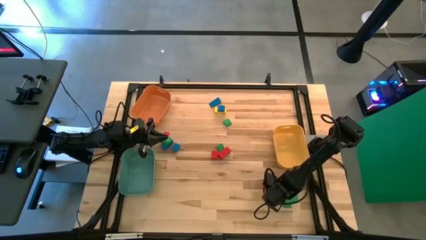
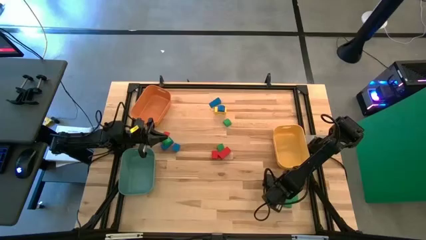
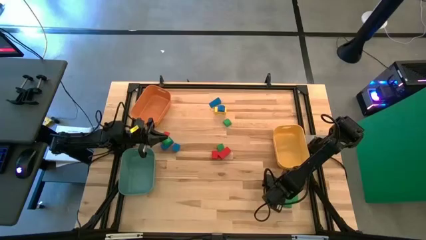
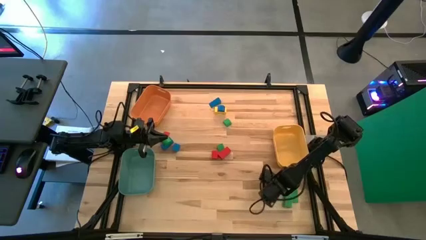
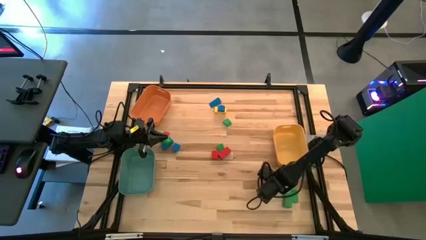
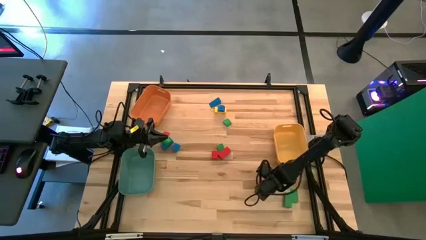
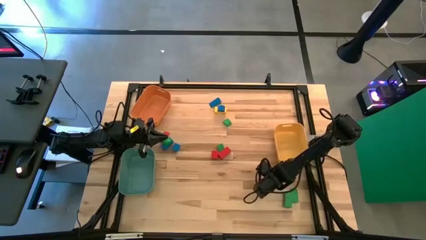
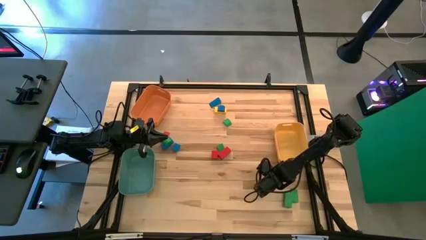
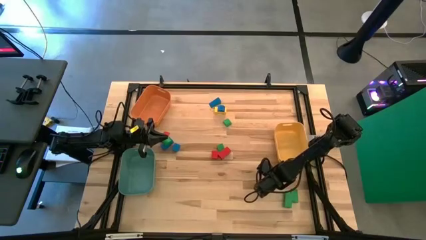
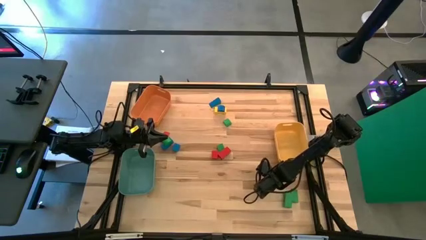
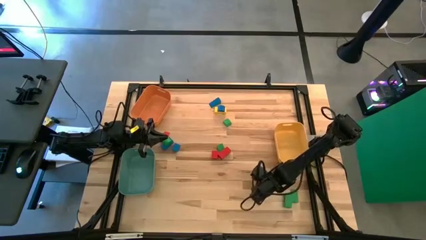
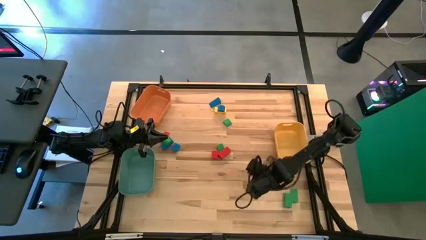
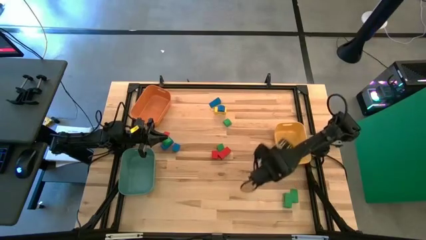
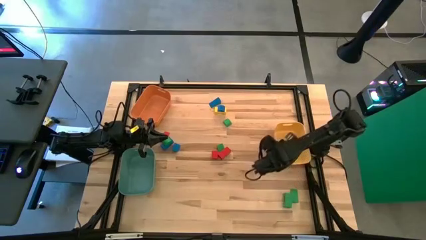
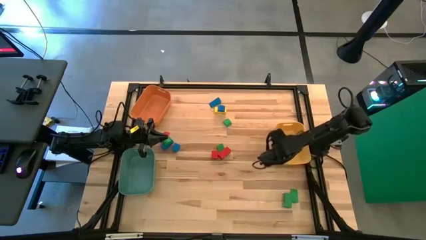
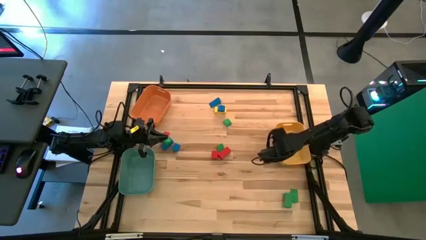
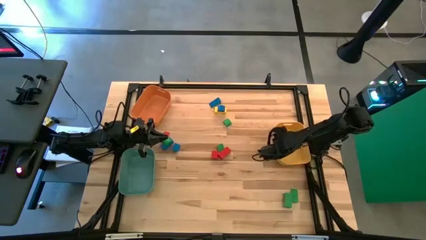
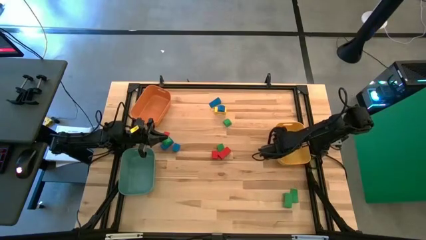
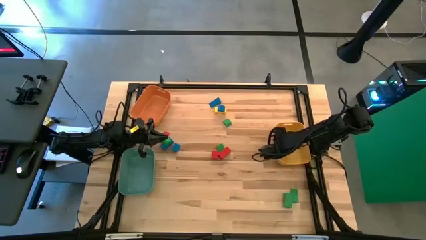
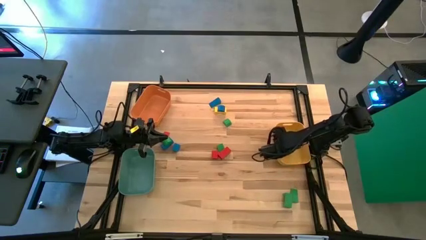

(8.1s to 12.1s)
Task: Sort blocks by size
Put the red half-circle block into the yellow bin

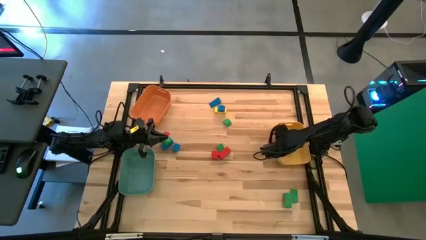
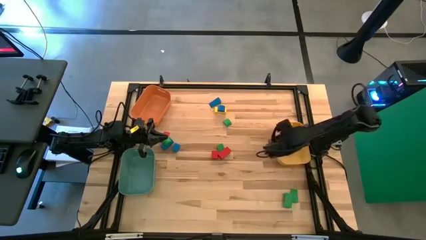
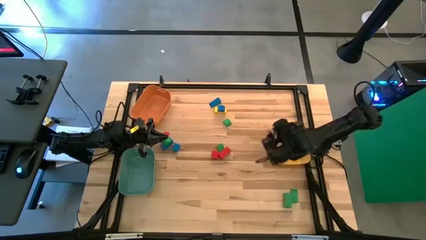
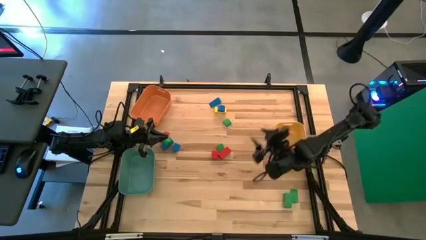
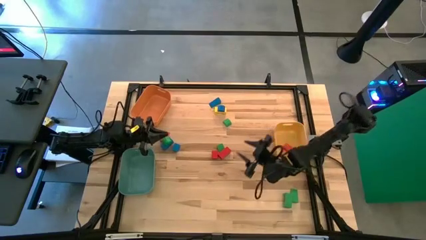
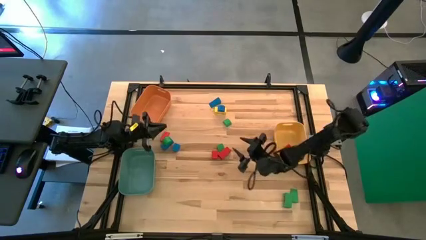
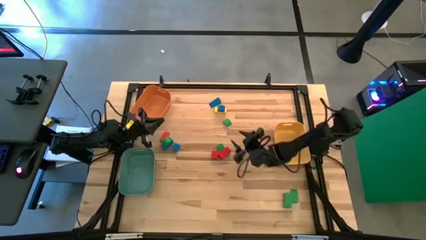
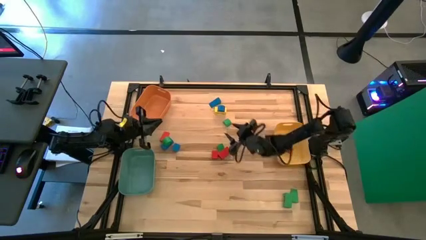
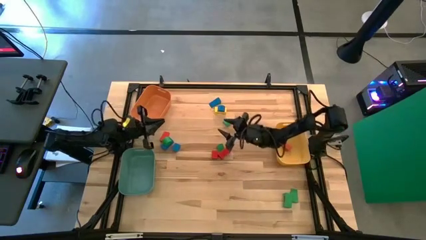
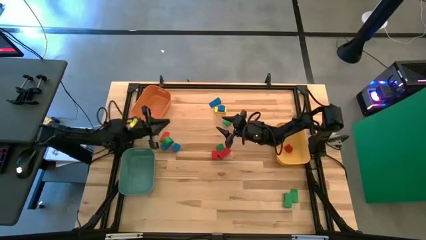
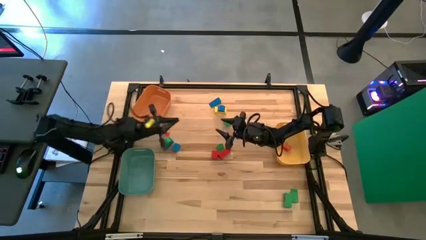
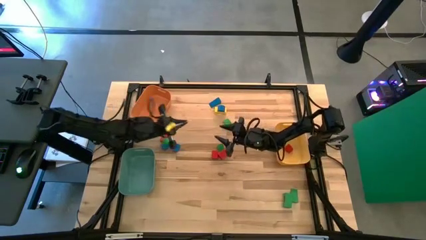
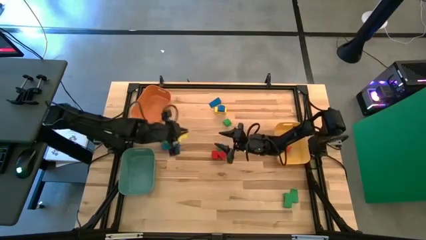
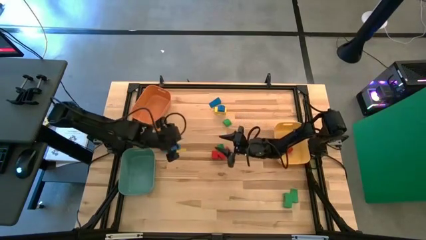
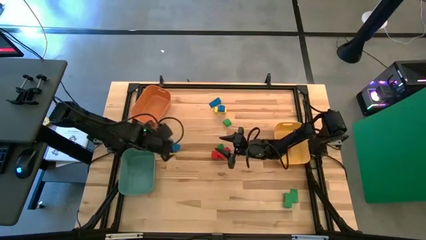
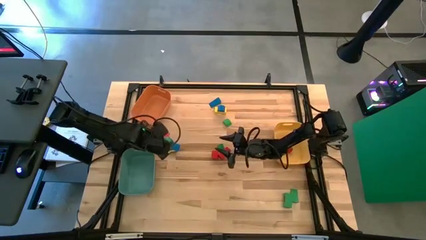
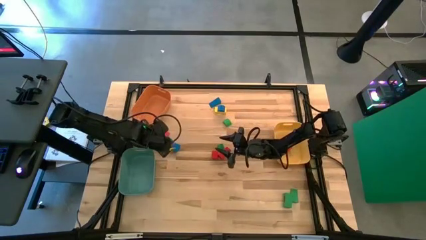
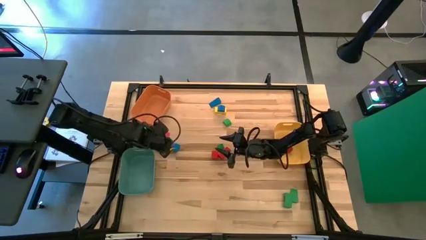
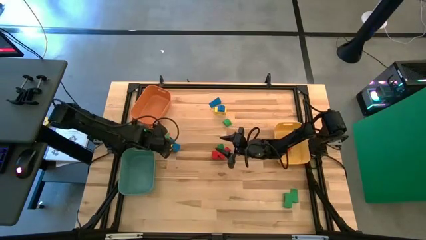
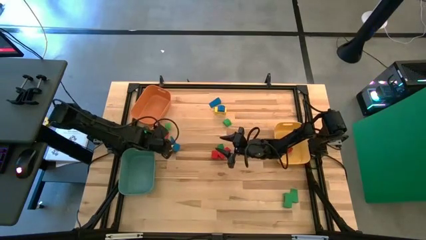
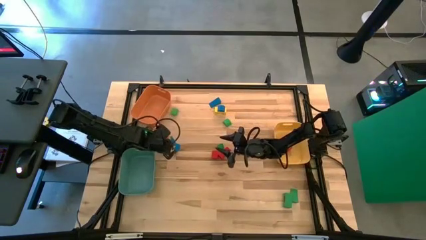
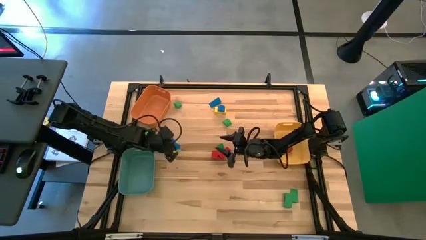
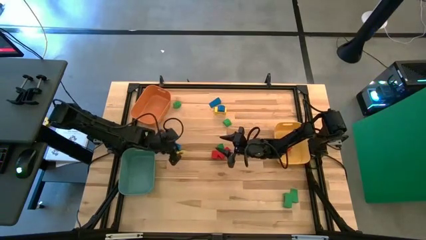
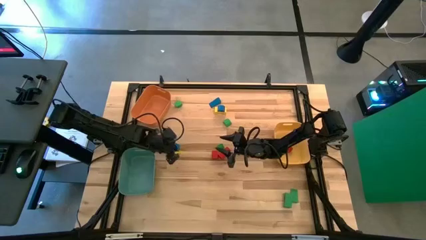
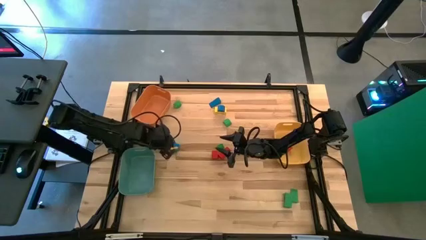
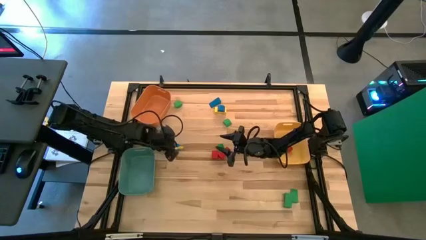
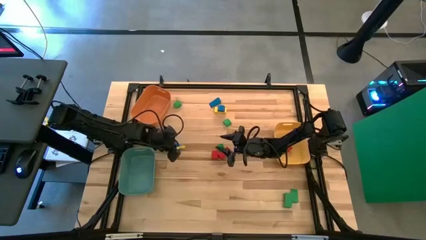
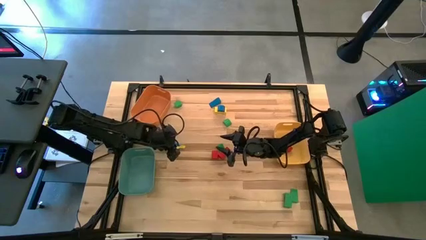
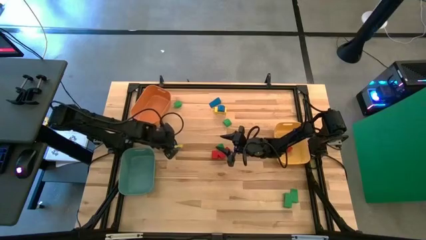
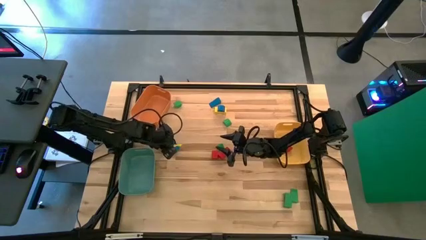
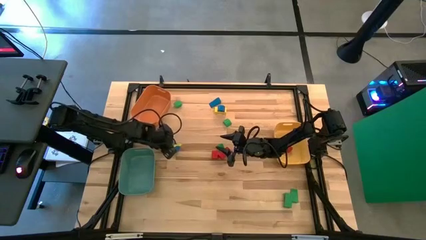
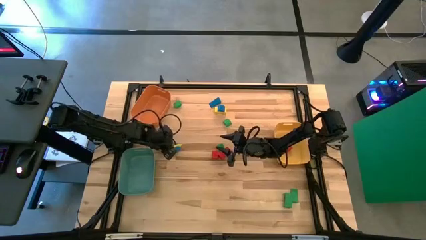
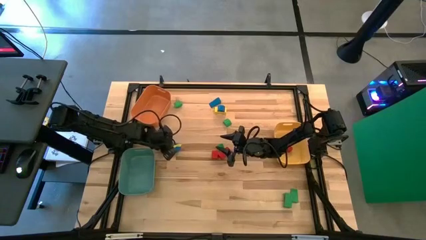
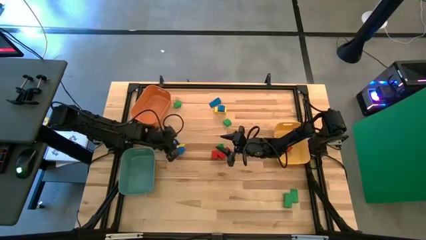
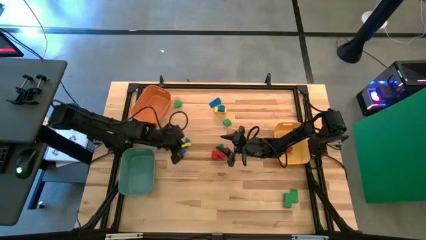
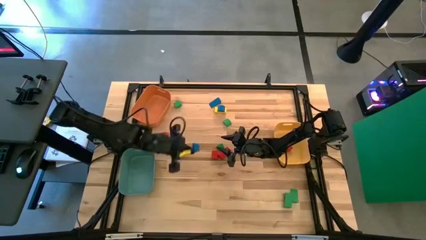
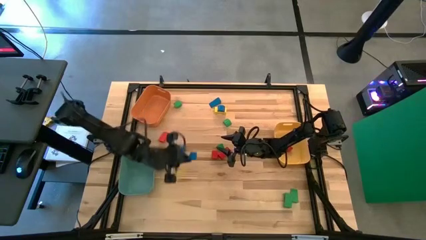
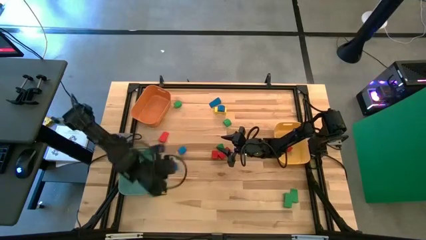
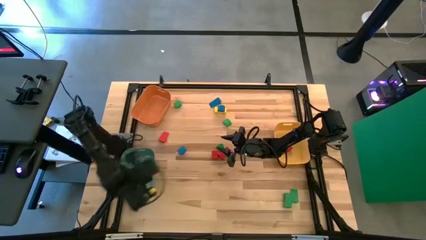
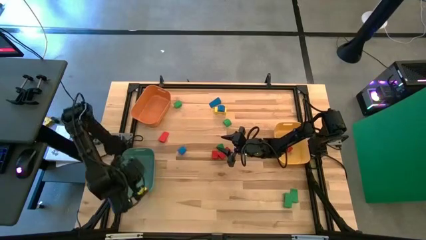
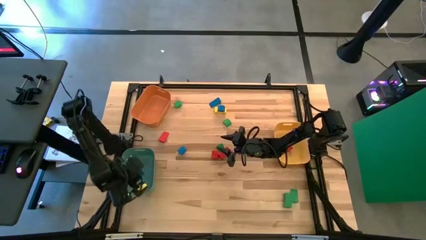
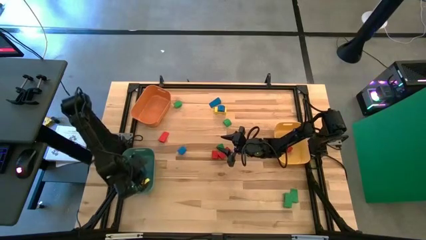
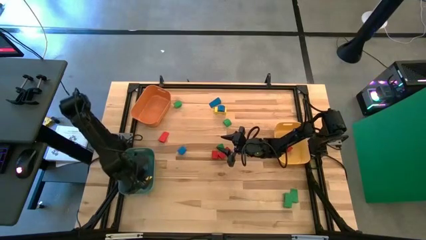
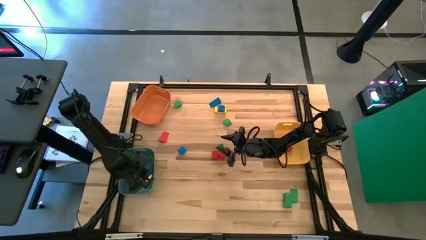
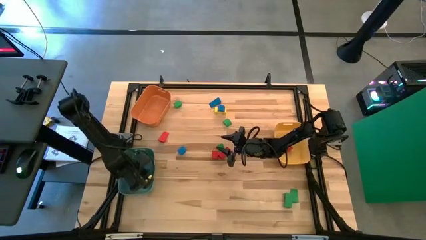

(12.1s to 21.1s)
Put the blue arch block into the blue bin

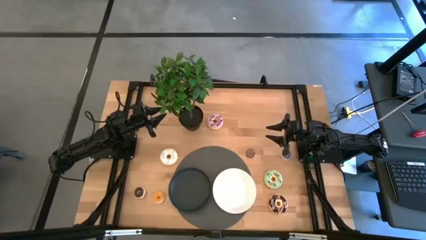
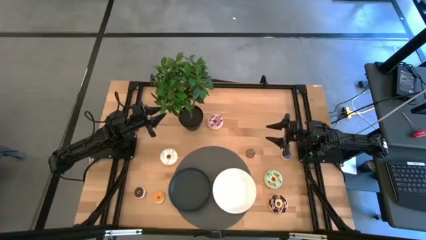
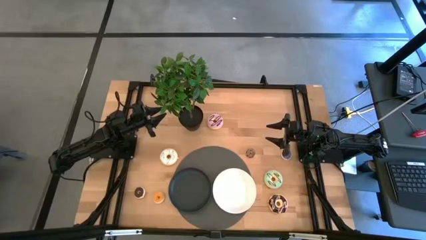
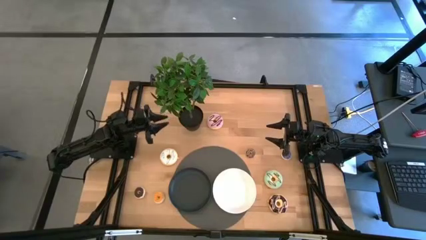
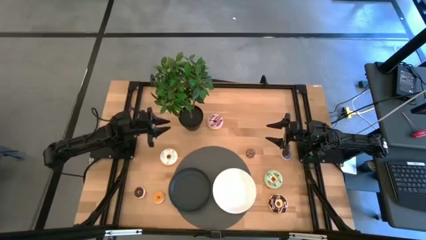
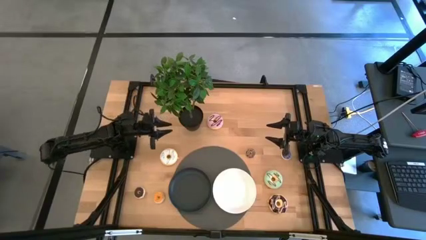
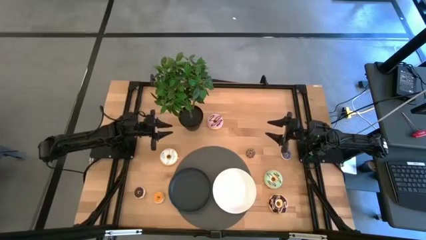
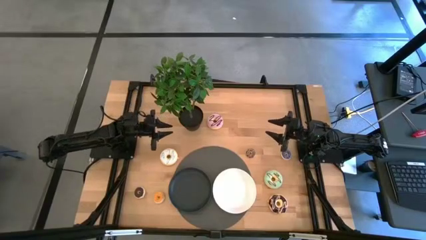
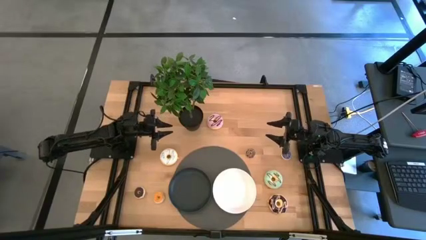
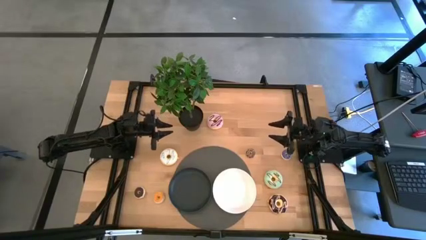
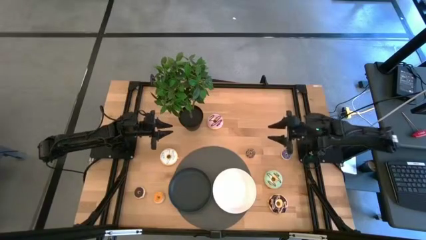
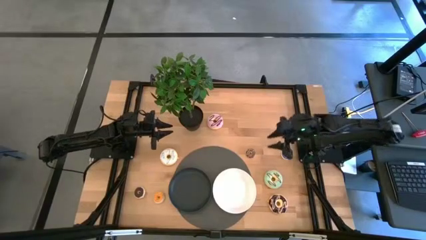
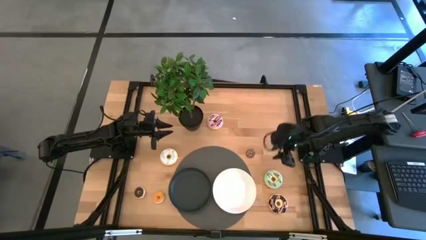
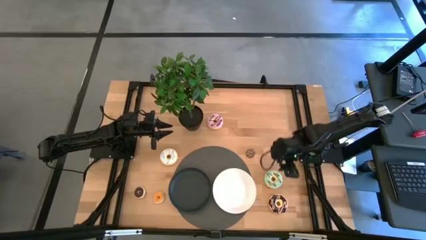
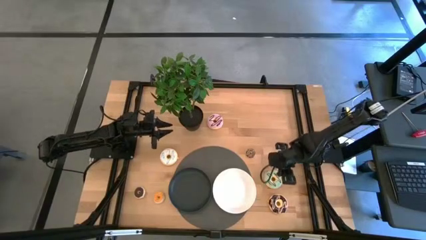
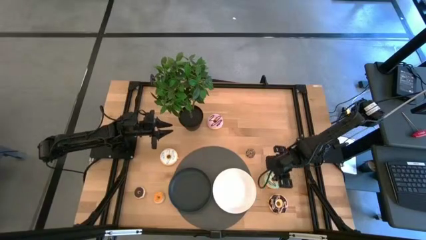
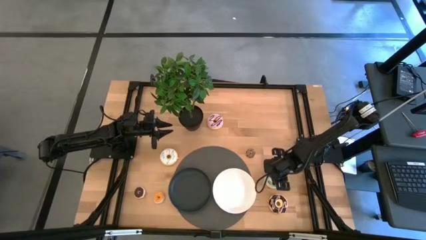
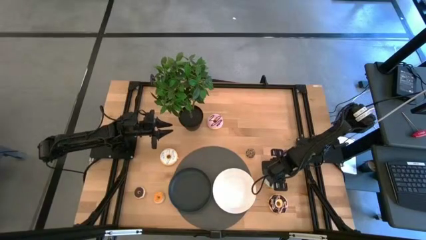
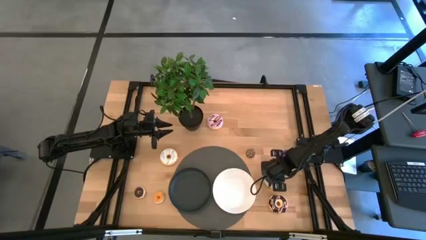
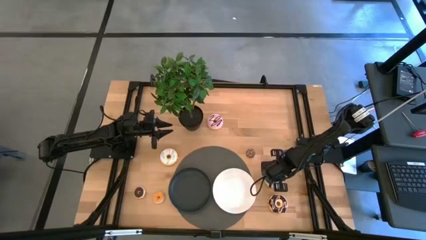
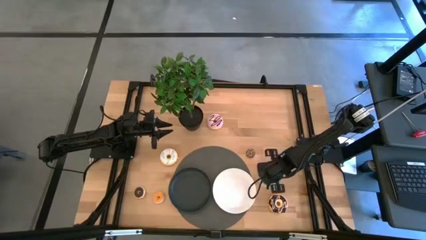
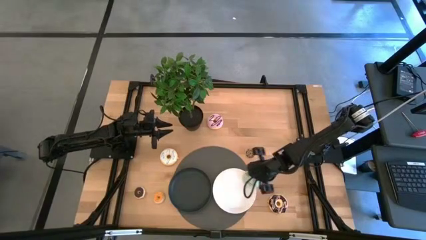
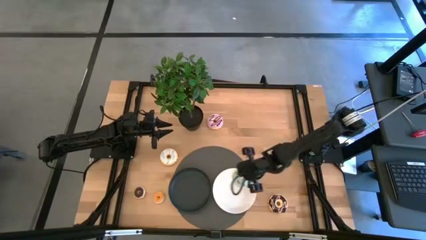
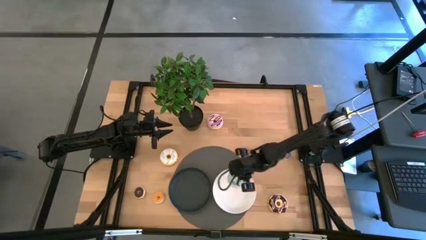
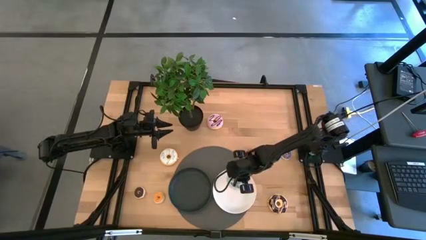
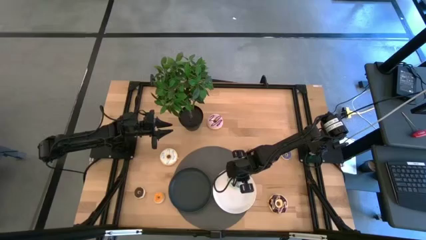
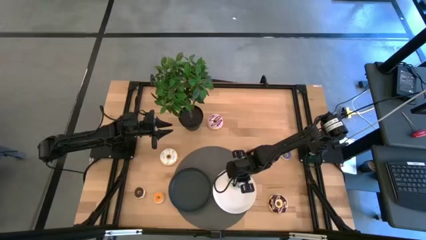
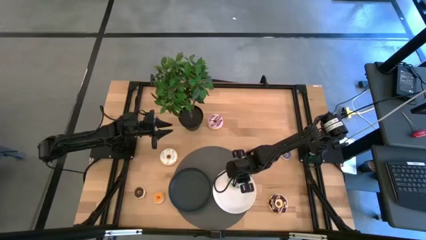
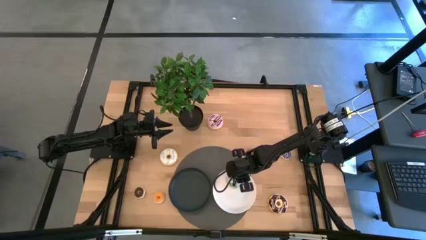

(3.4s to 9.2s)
Task: Pick & Place donuts
Put the big green donut into the white plate
